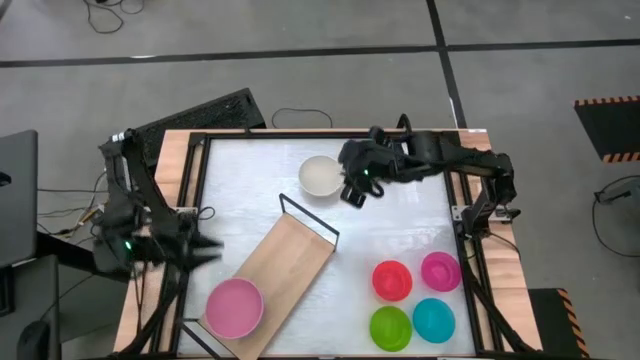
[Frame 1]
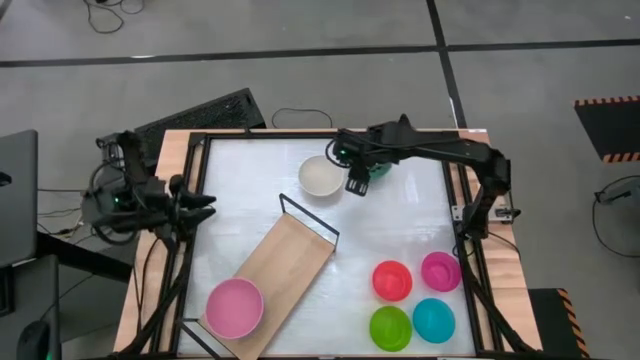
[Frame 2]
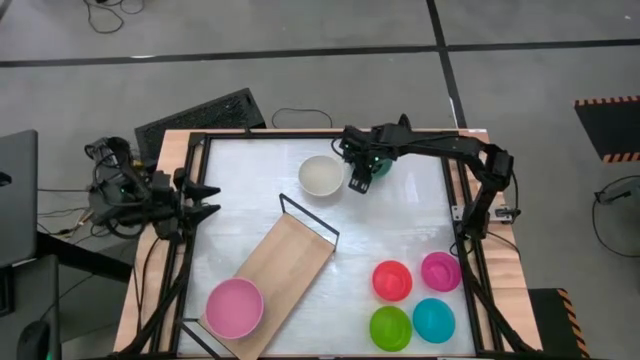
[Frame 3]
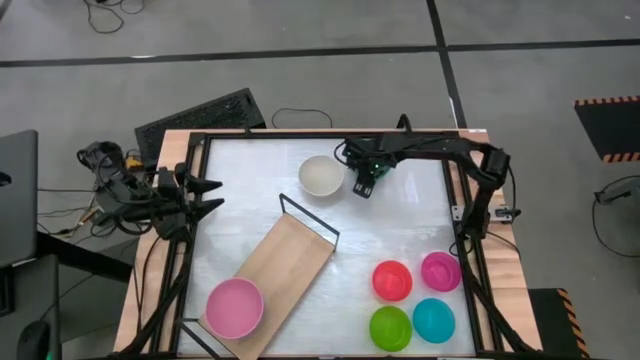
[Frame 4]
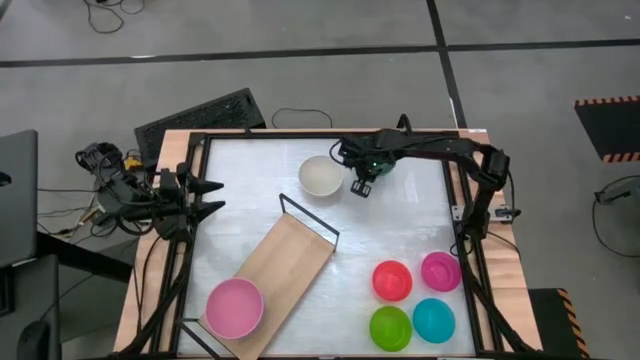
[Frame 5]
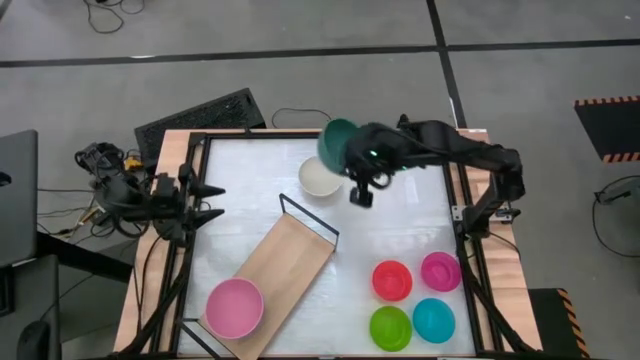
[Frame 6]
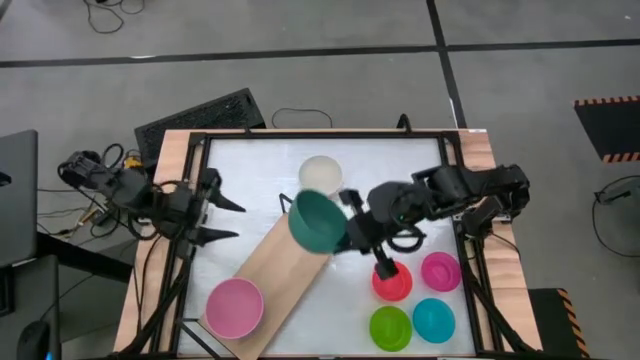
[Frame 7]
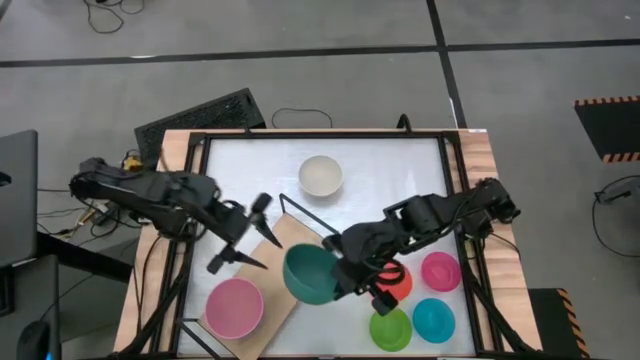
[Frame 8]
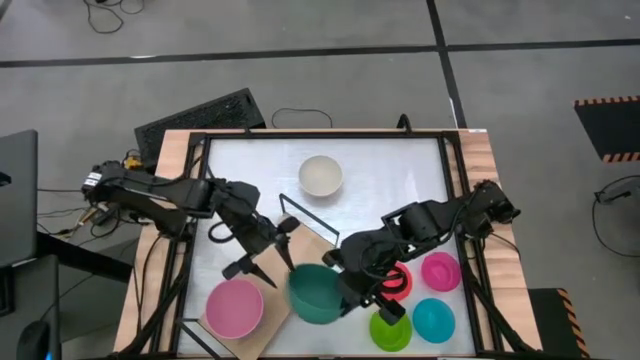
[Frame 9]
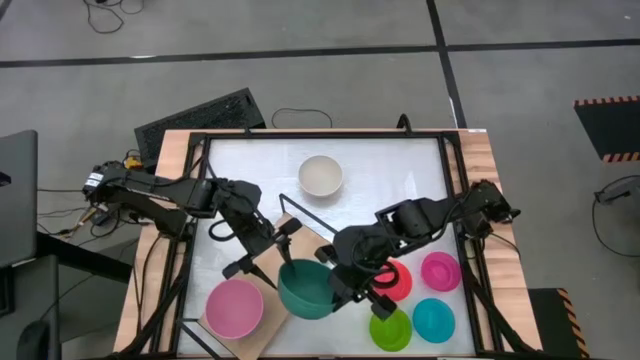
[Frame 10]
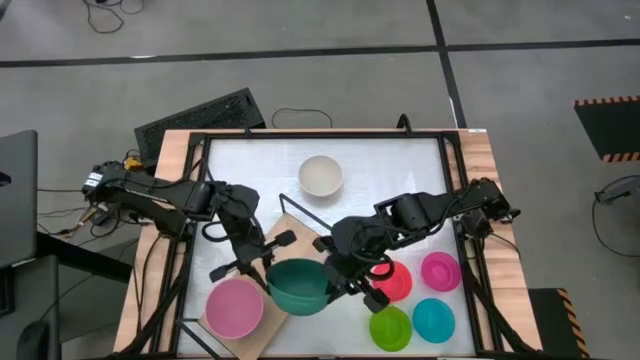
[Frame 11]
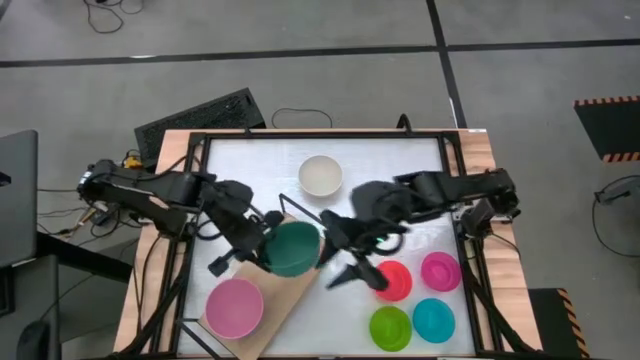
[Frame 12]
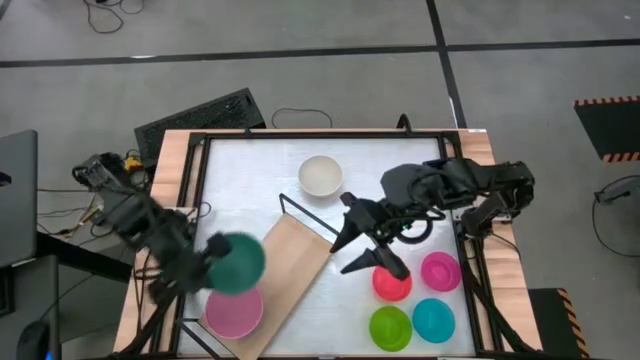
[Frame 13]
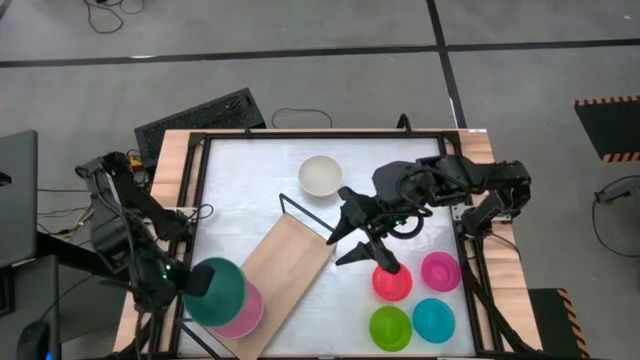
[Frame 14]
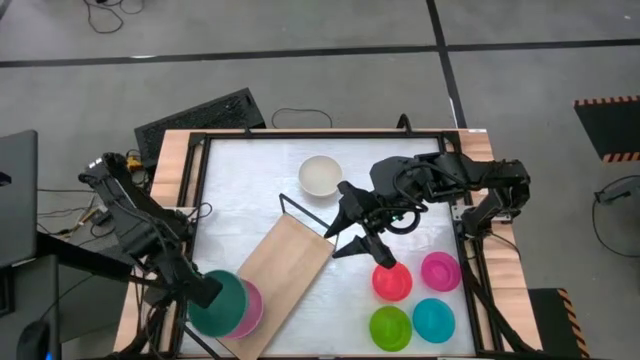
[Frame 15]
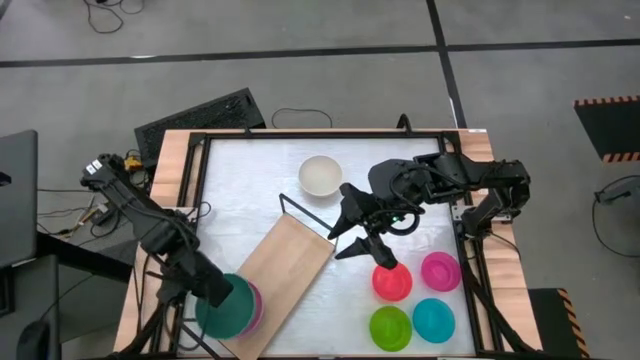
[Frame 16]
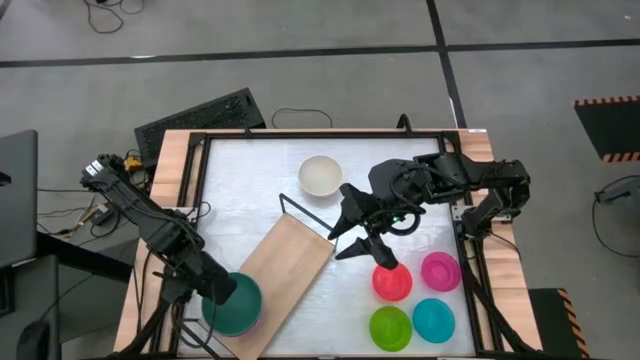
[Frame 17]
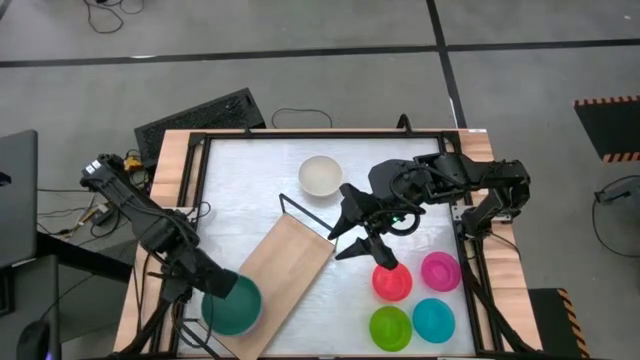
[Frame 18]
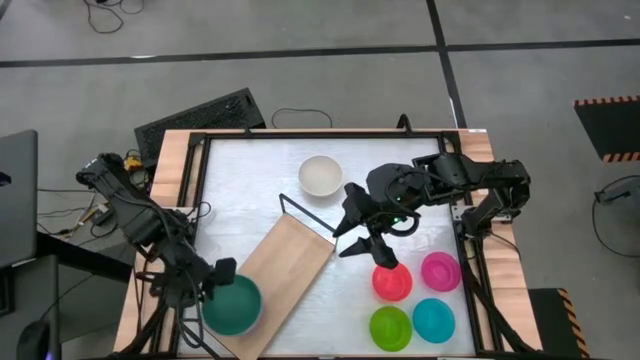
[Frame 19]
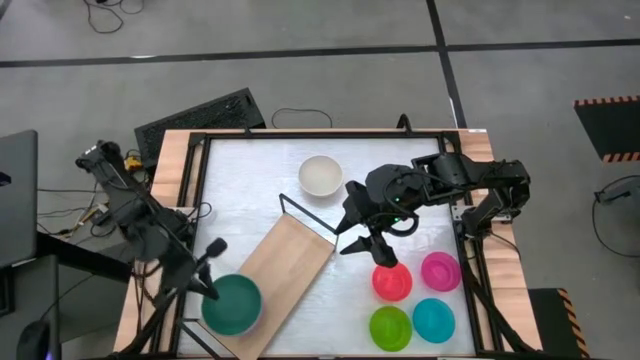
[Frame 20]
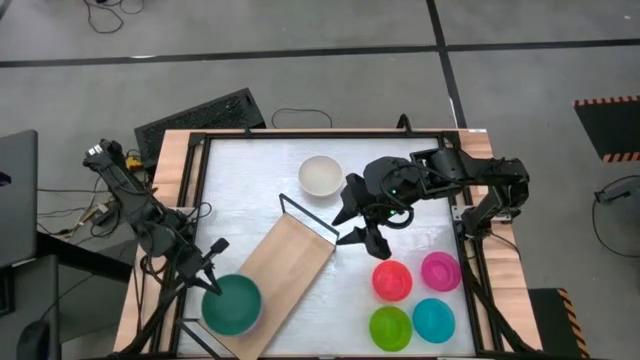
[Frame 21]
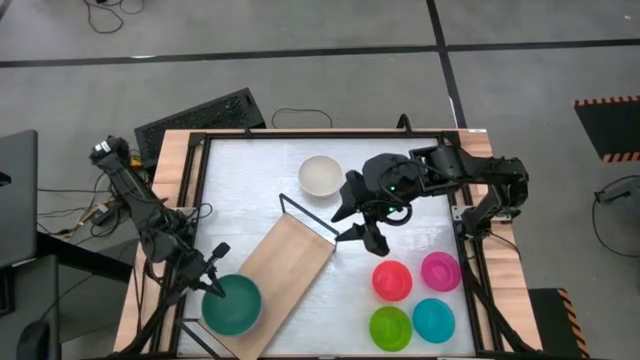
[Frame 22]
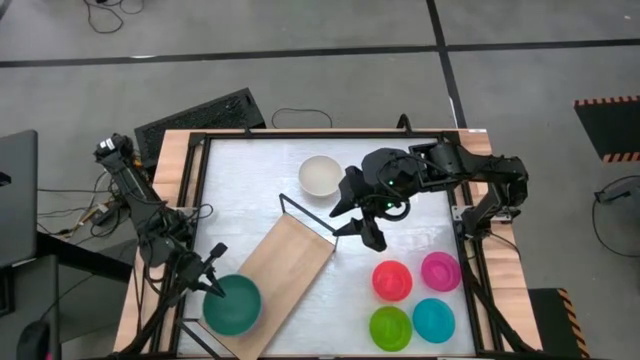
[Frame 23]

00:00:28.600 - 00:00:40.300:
Task: Place and stack bowls onto a shelf
Stack the big green bowl on the big pink bowl on the shelf

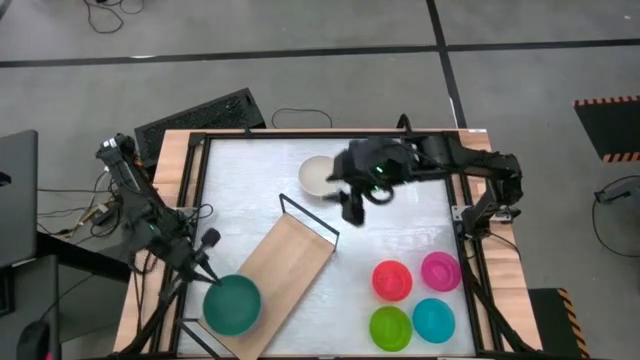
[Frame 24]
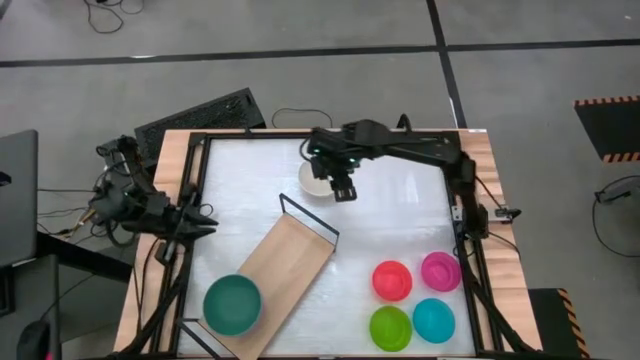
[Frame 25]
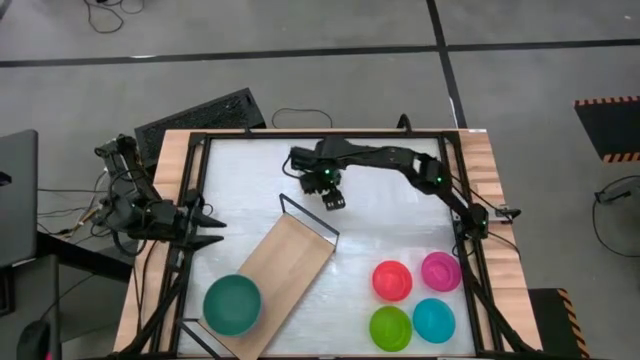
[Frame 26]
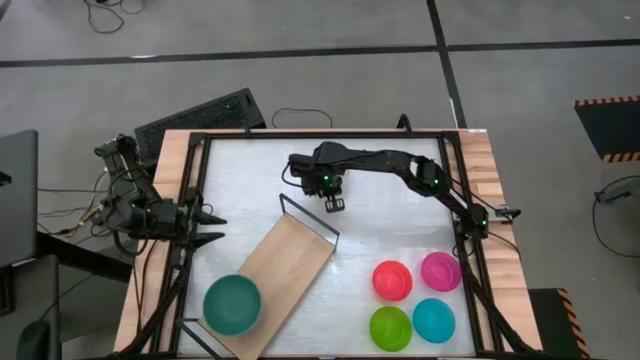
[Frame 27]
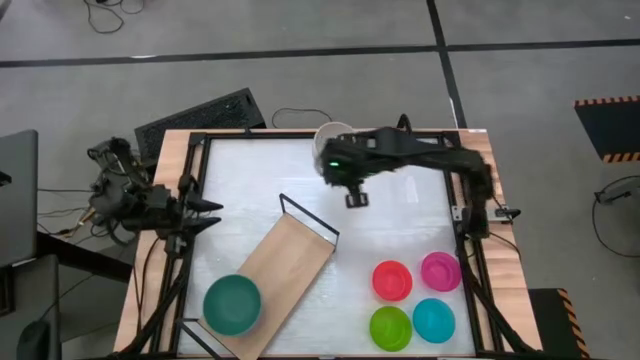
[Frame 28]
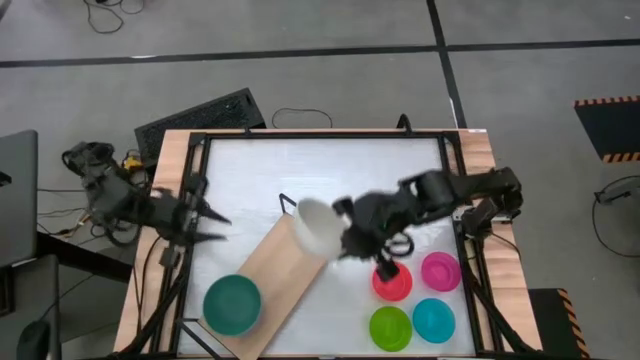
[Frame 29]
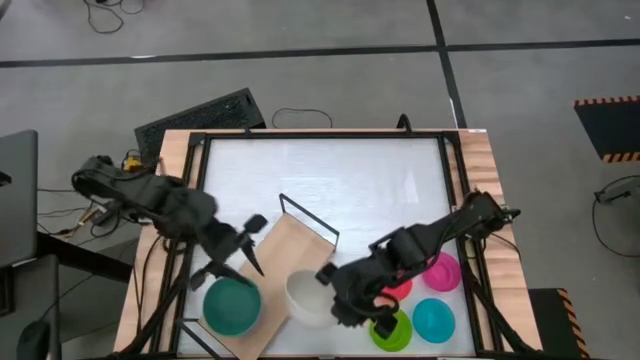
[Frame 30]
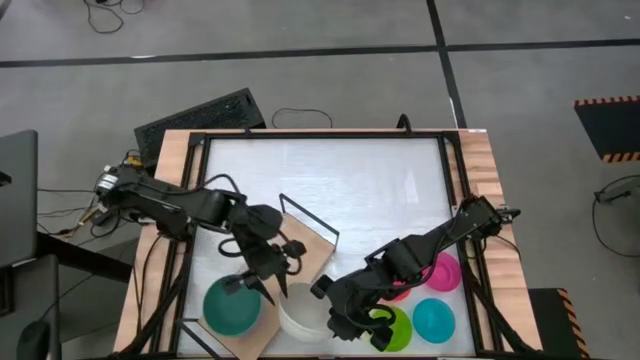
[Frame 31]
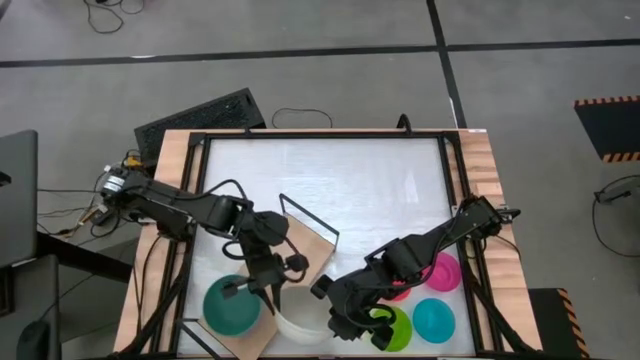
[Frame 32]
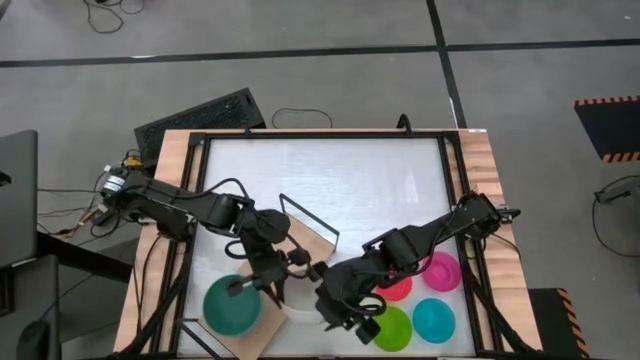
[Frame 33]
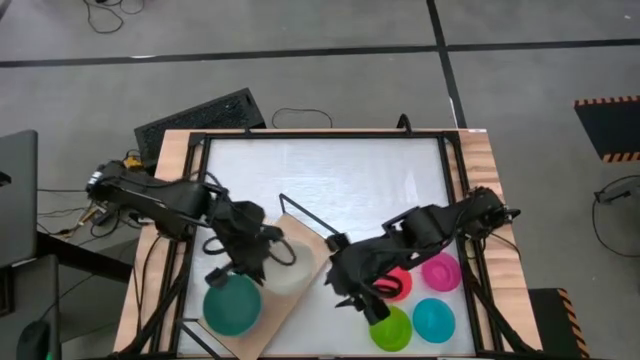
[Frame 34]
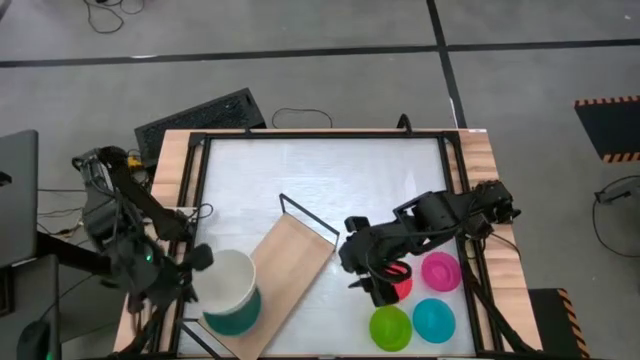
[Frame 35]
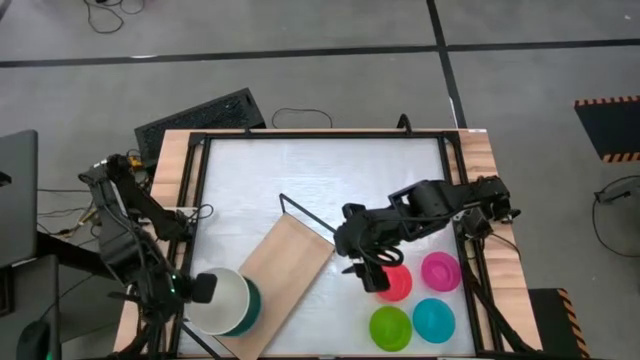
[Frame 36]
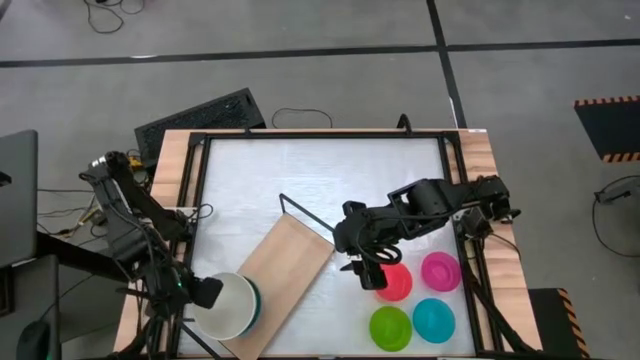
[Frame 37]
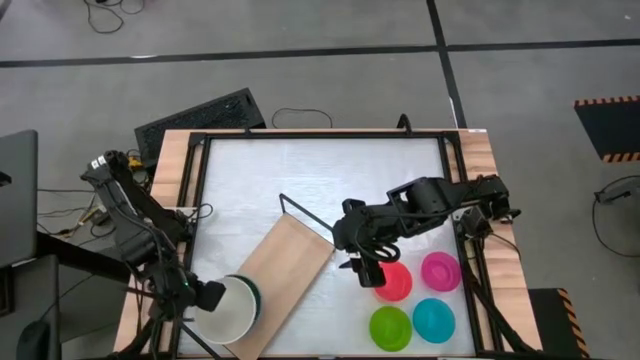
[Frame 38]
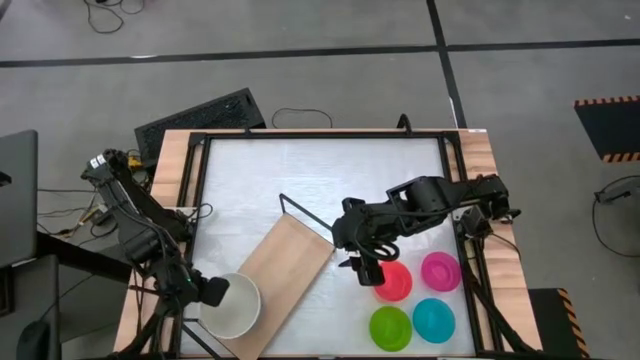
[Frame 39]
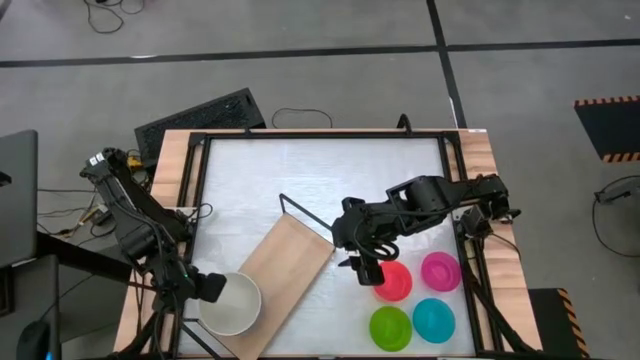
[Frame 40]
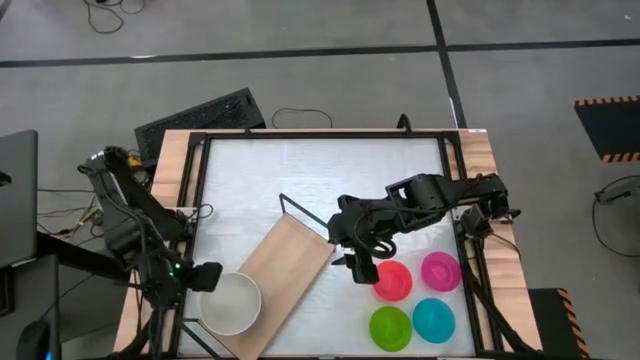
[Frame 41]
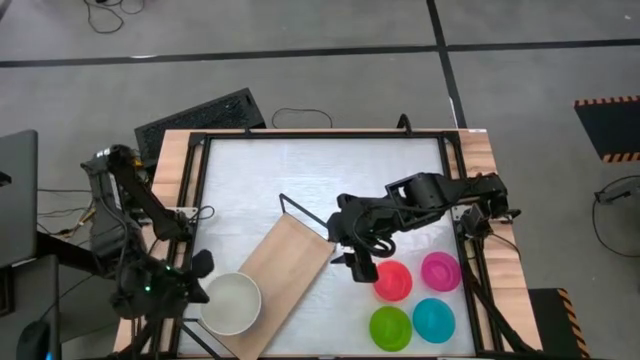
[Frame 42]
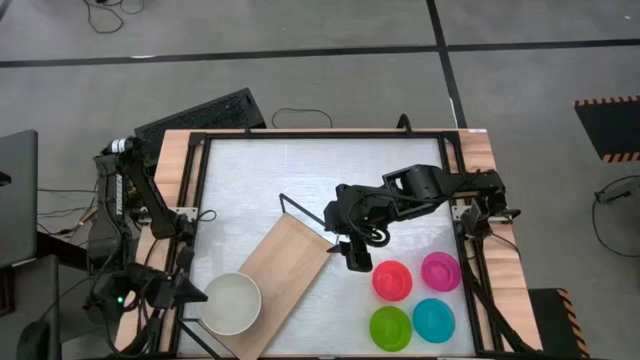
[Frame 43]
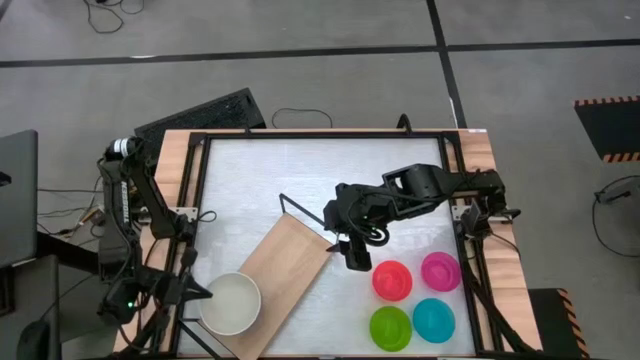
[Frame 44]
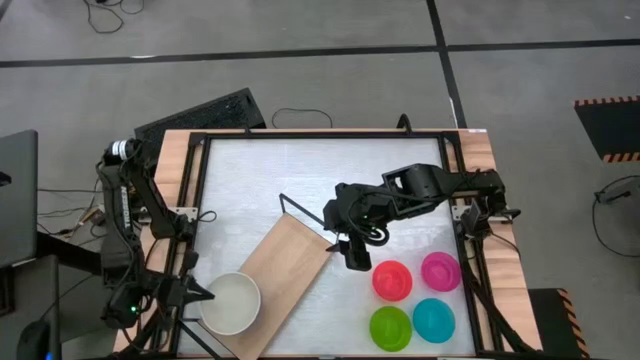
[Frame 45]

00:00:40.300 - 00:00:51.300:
Stack the big white bowl on the big green bowl on the shelf
